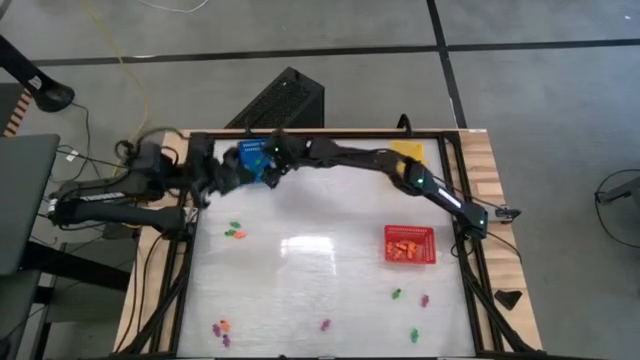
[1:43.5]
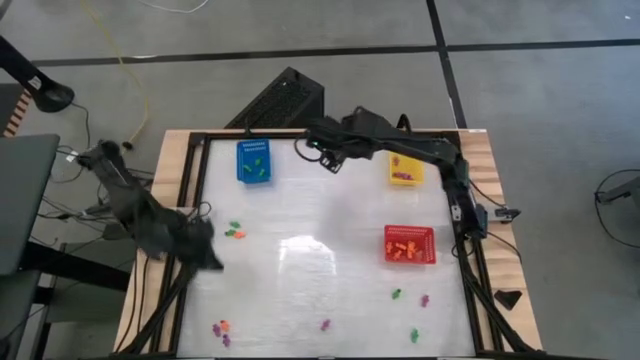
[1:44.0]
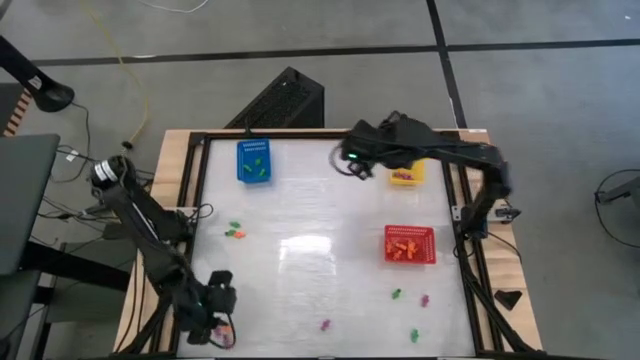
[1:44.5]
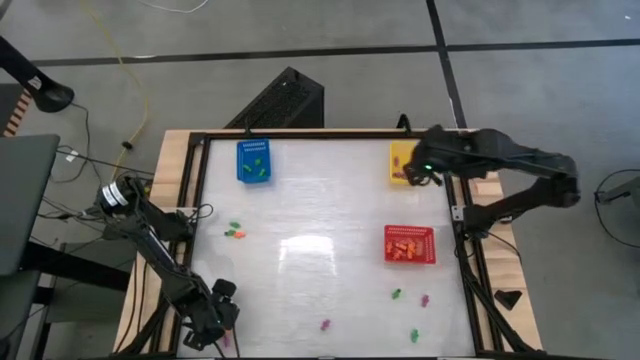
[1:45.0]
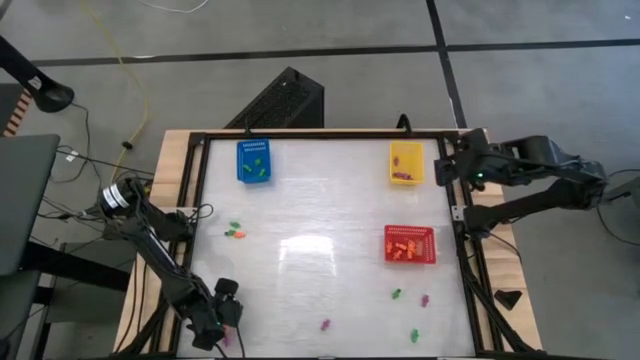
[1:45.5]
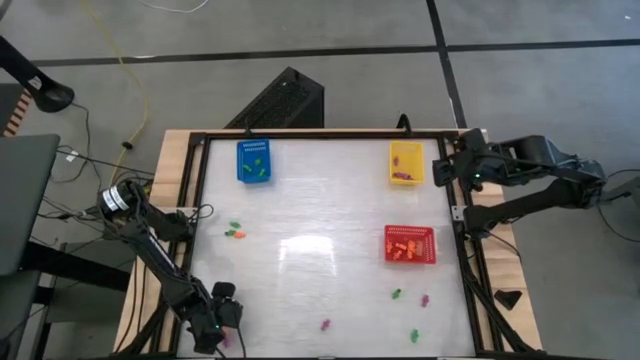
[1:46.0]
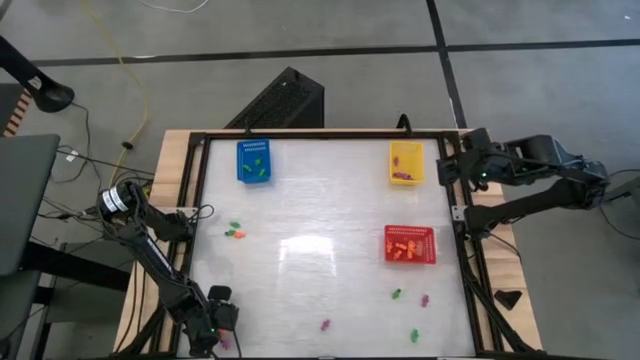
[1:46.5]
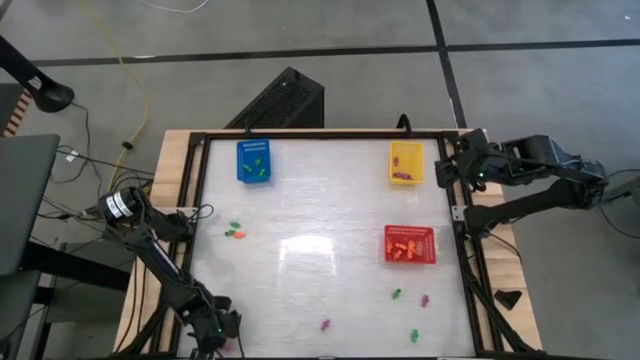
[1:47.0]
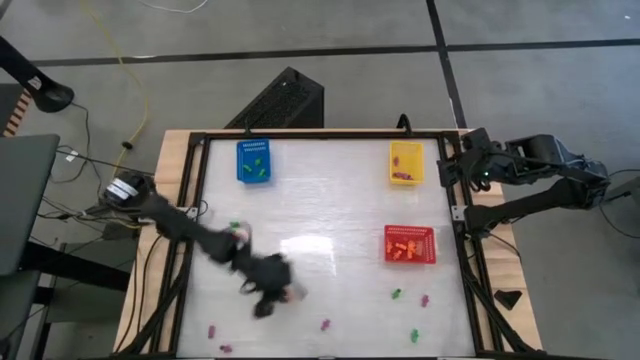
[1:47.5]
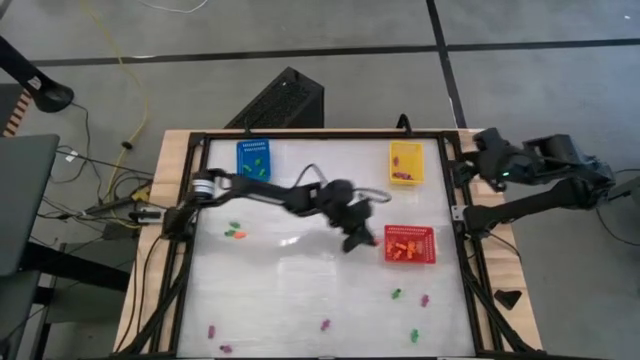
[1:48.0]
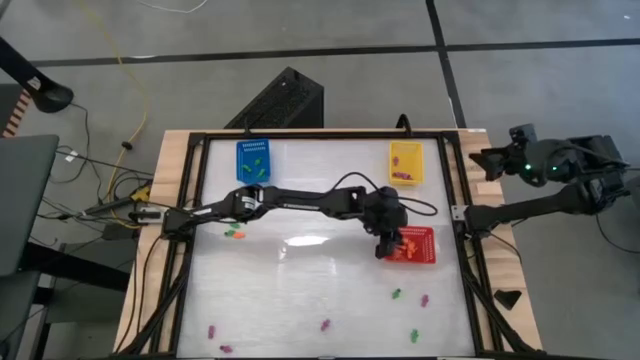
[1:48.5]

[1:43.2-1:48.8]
Task: Sort Halloween decoration
Put the orange skeleton toy into the red bin

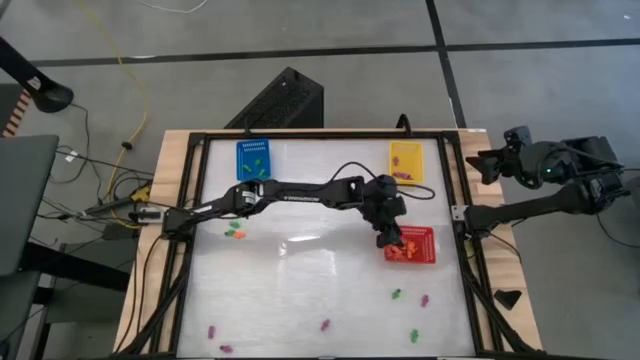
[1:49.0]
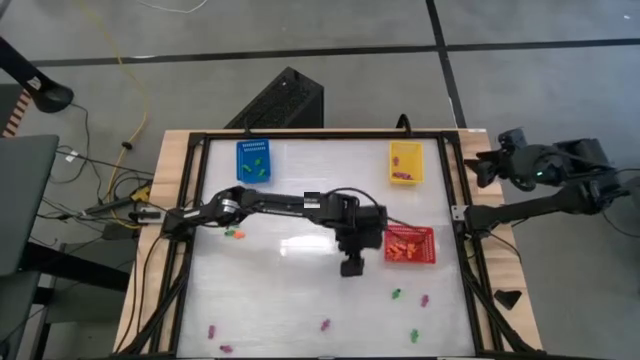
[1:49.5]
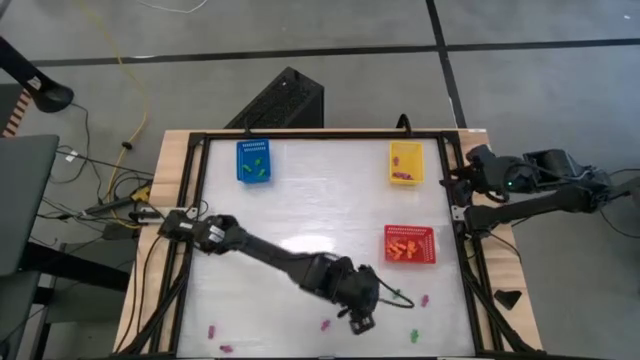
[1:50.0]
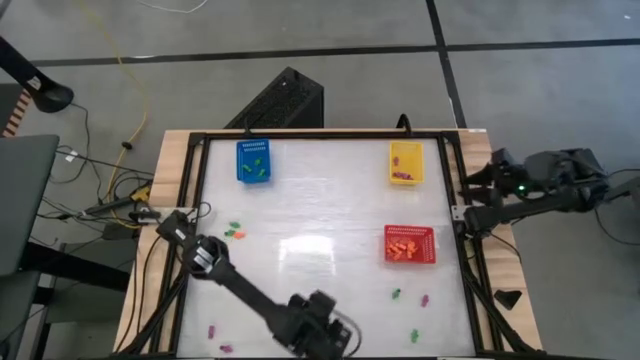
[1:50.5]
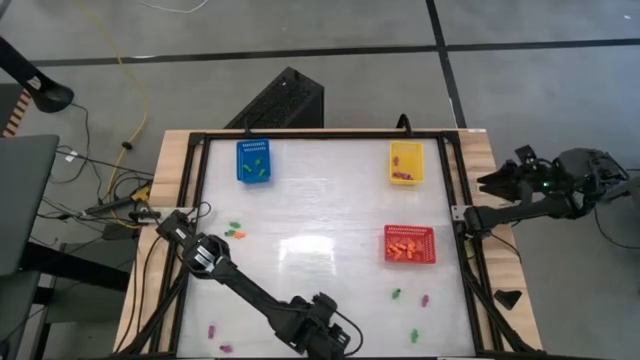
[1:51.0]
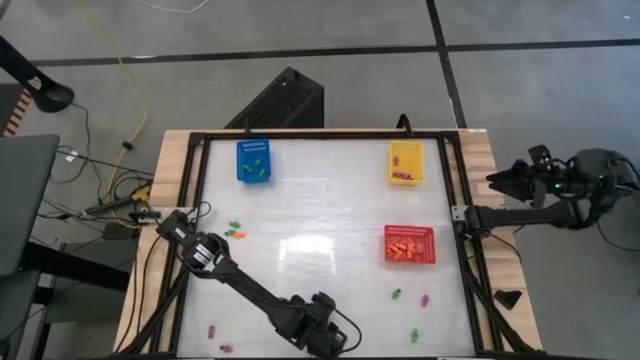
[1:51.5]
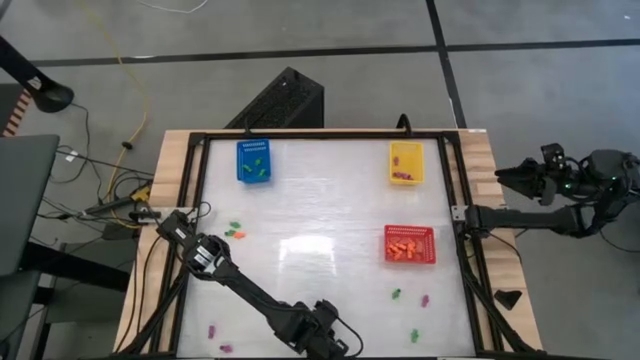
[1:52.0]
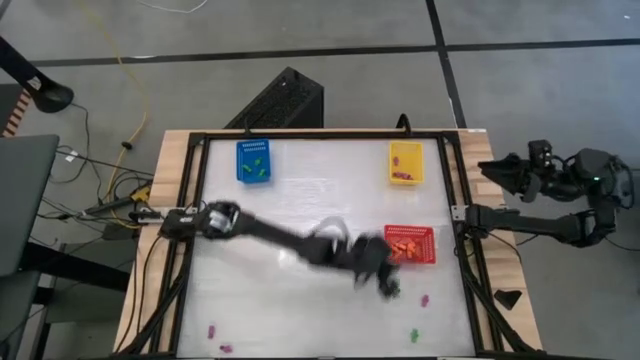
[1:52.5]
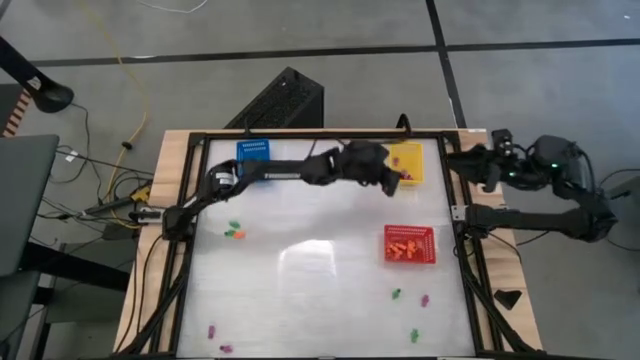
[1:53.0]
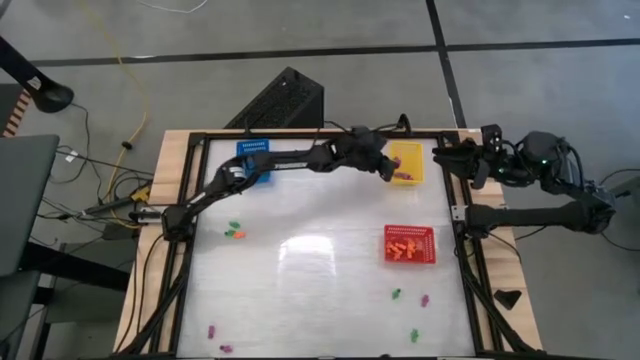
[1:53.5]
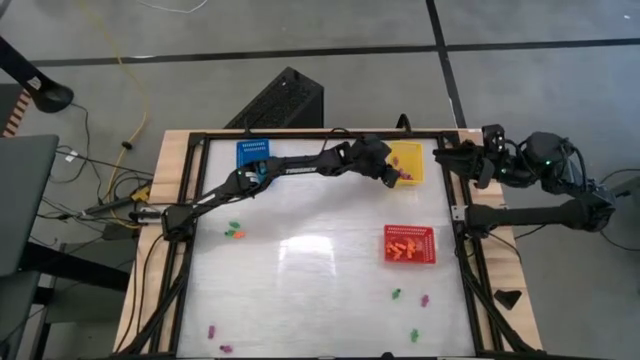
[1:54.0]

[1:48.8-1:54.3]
Put the purple skeleton toy into the yellow bin

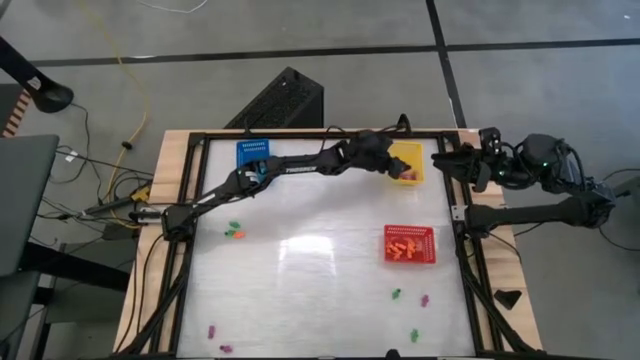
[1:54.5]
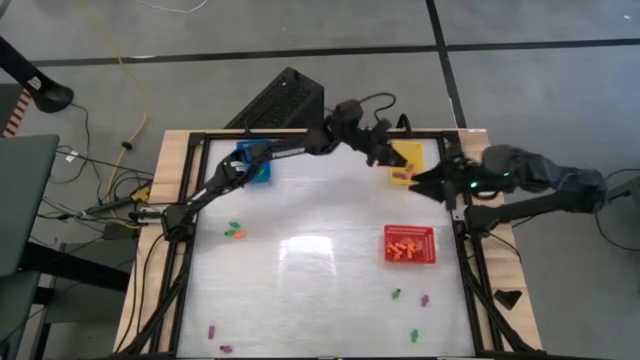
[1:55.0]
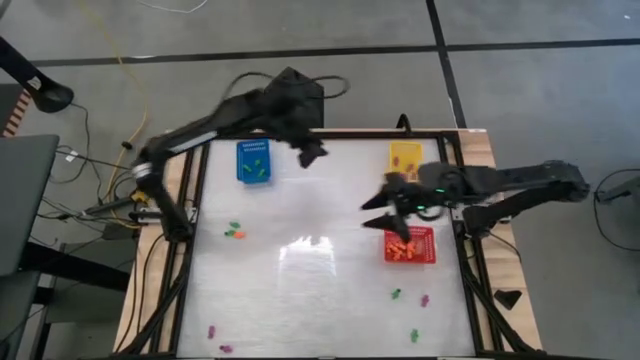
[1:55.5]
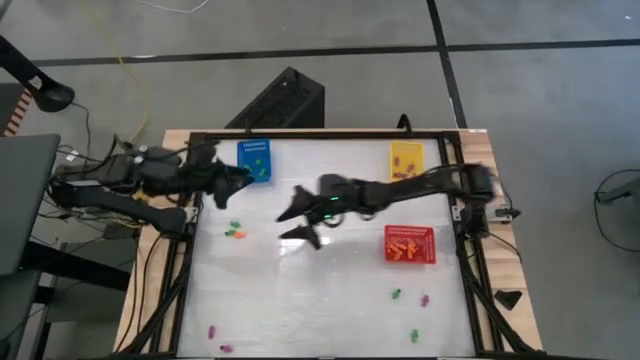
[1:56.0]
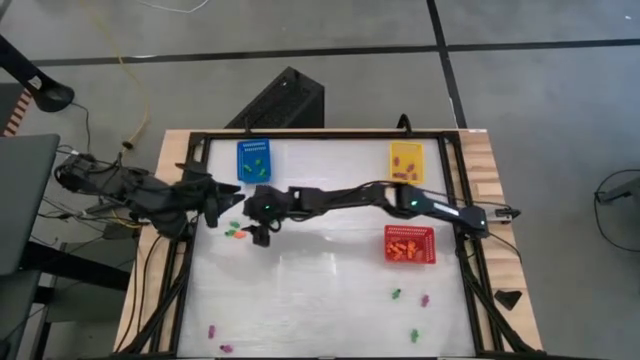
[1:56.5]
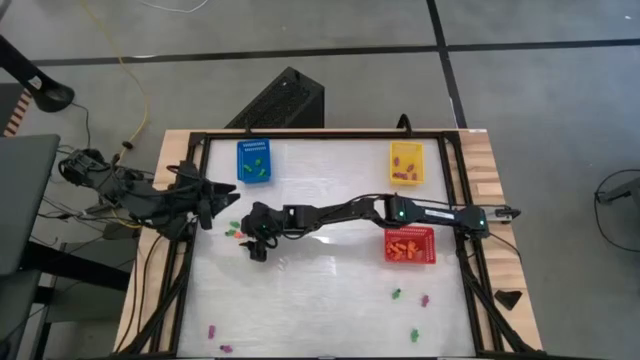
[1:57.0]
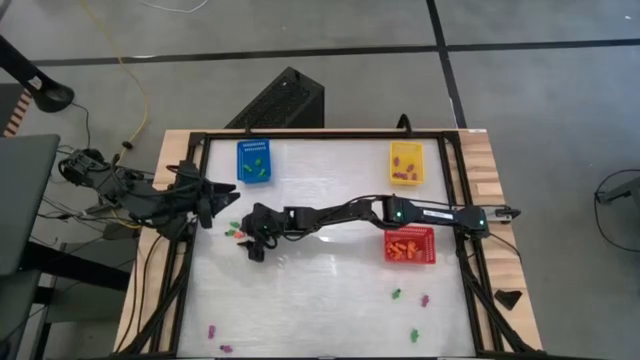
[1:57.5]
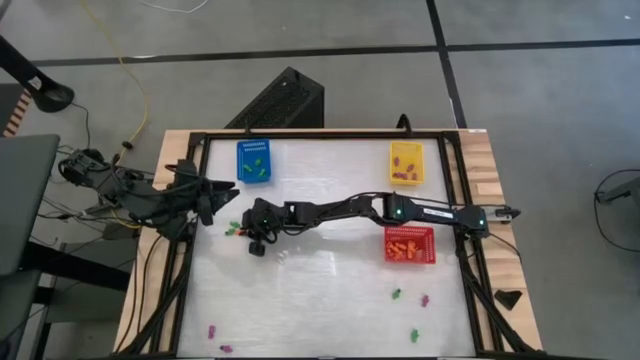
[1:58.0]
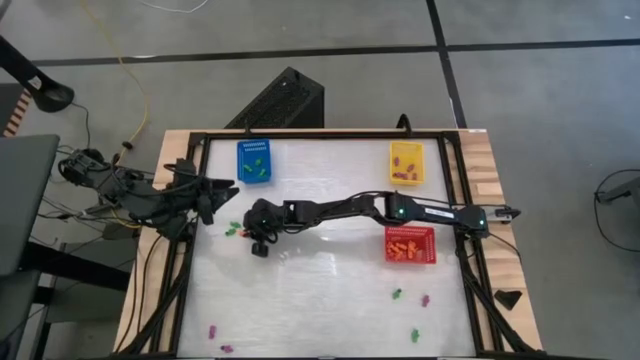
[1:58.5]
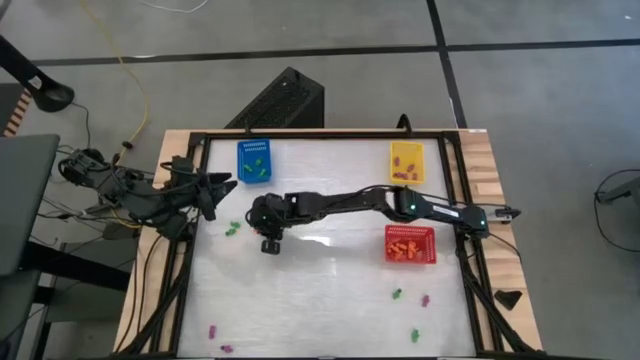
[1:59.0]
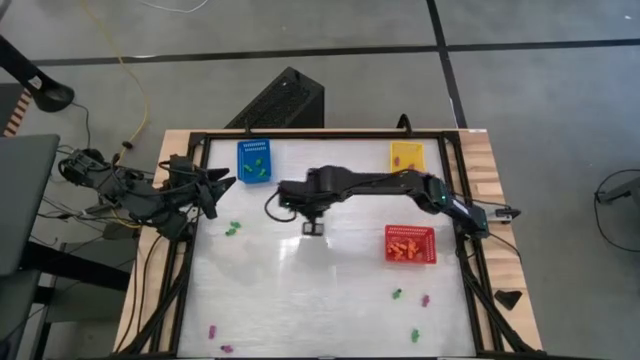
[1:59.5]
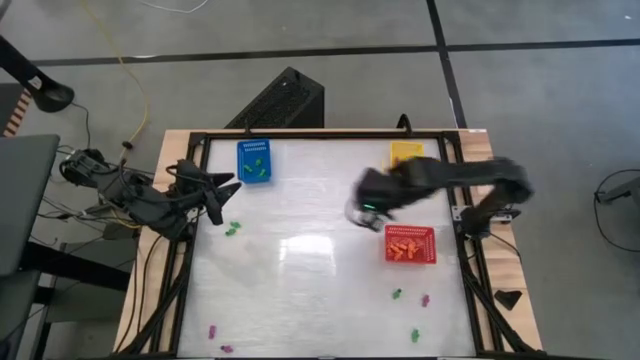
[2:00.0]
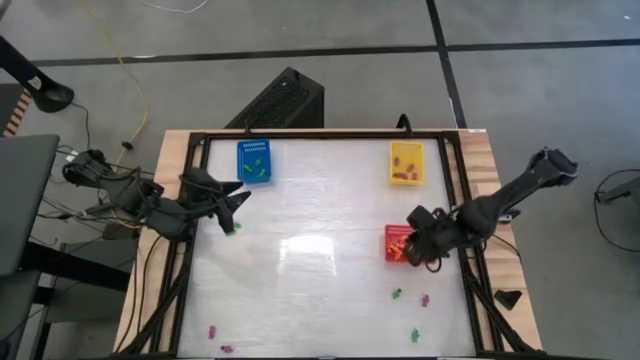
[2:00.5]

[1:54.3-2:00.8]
Put the orange skeleton toy into the red bin

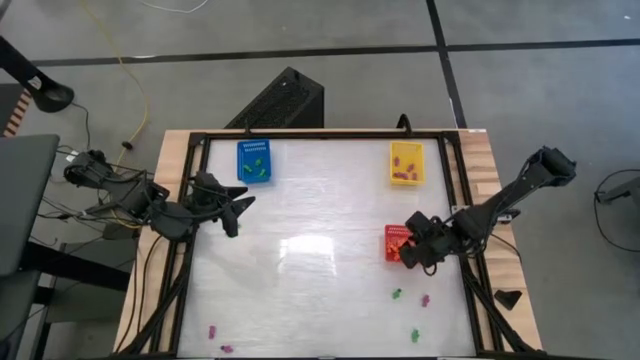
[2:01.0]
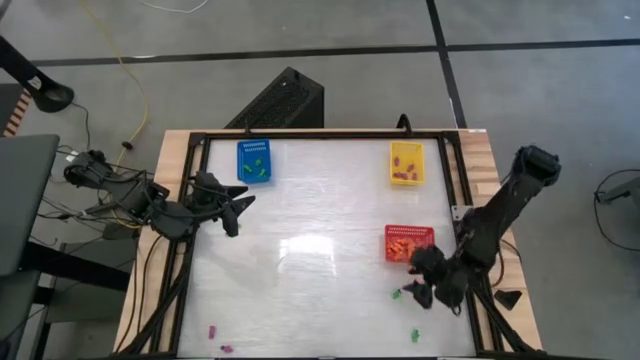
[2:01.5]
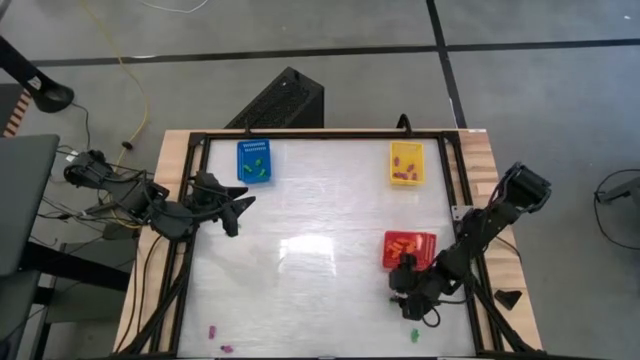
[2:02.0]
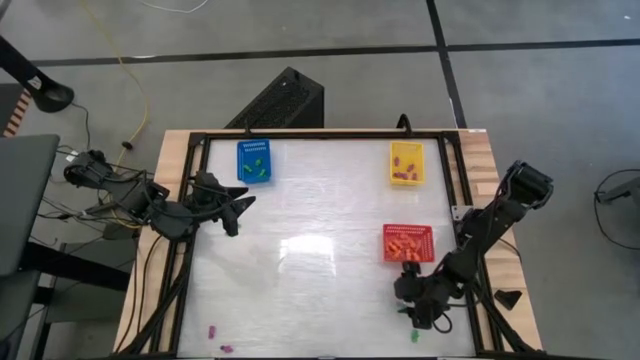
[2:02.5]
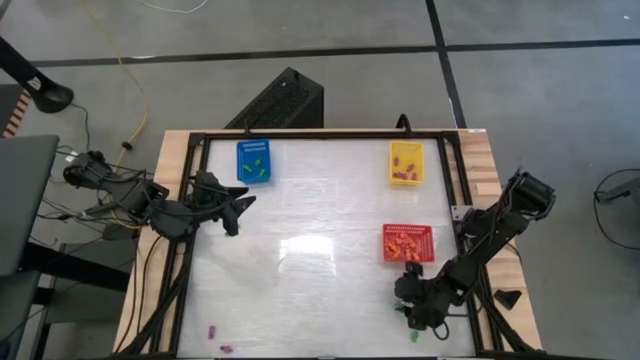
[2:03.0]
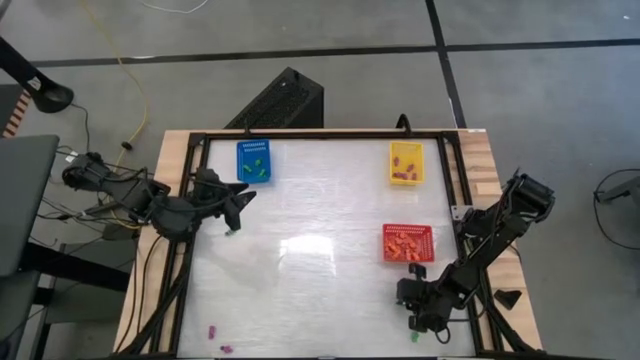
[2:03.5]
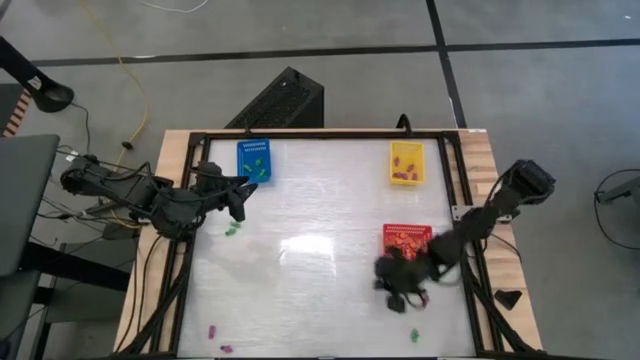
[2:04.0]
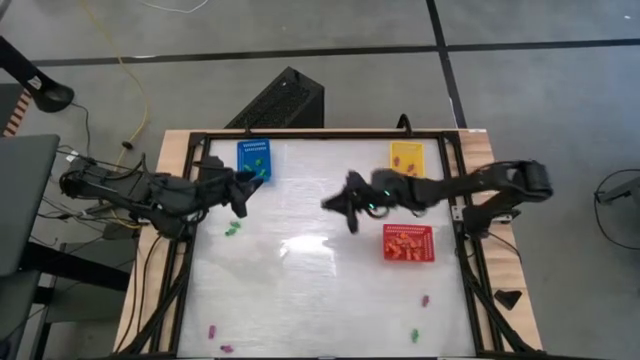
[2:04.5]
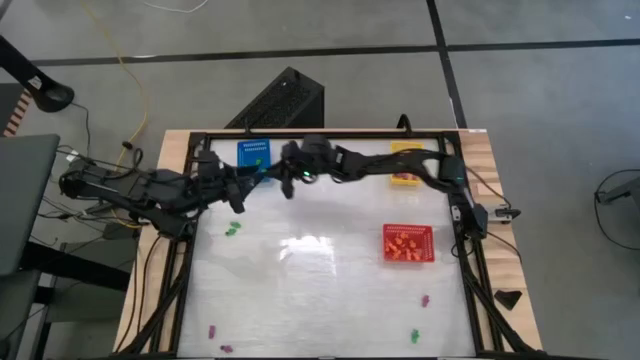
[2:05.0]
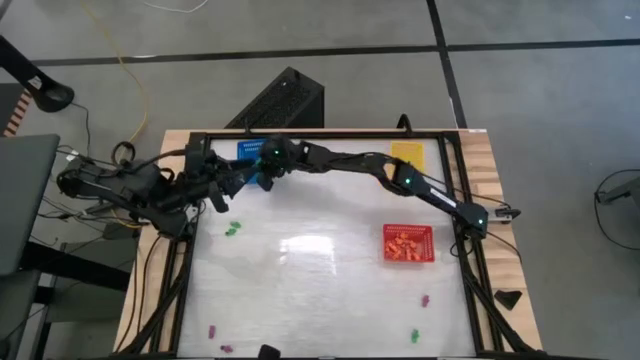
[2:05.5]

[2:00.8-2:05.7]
Put the green skeleton toy into the blue bin
